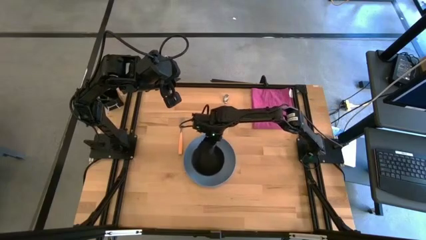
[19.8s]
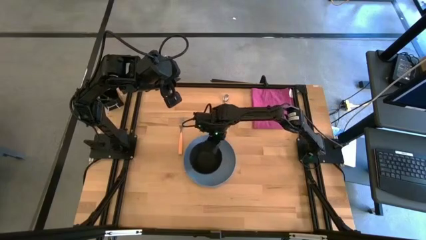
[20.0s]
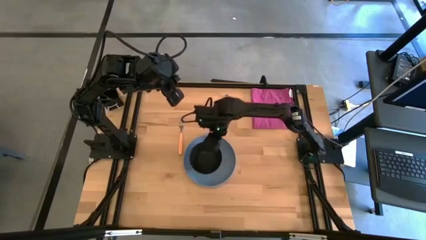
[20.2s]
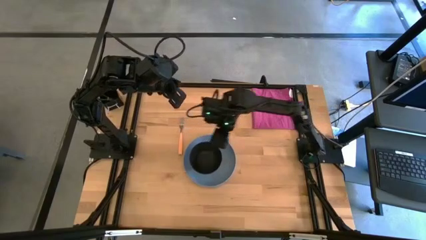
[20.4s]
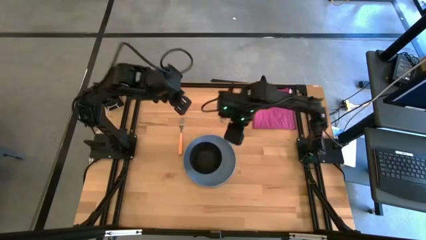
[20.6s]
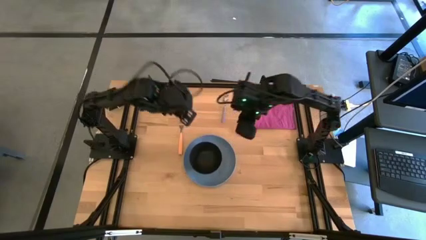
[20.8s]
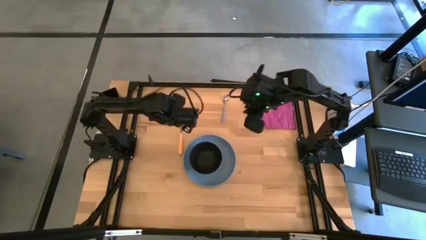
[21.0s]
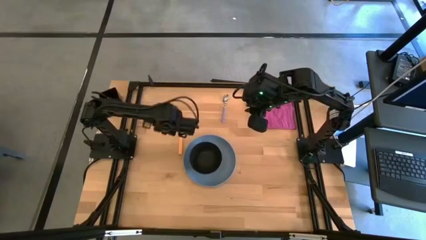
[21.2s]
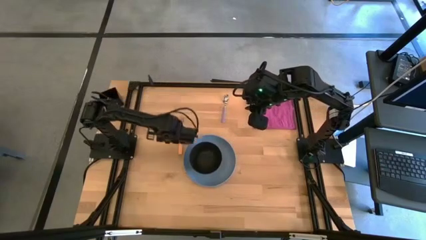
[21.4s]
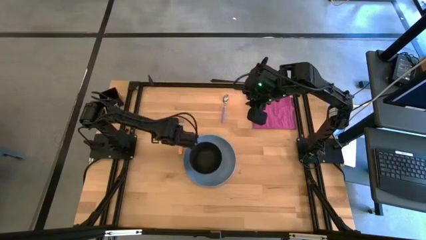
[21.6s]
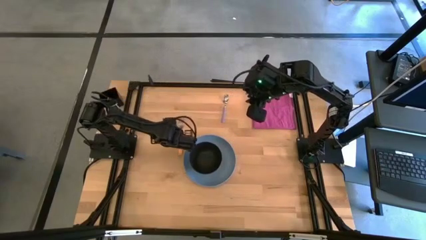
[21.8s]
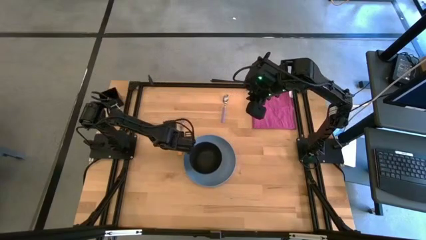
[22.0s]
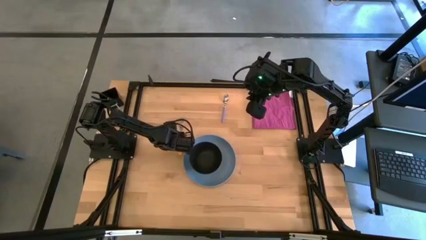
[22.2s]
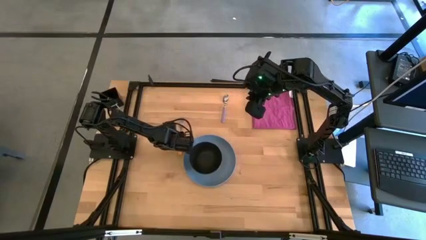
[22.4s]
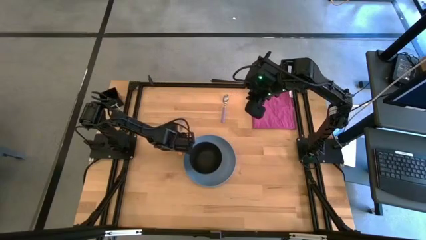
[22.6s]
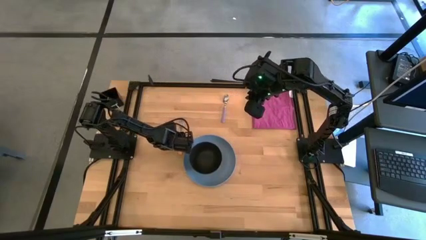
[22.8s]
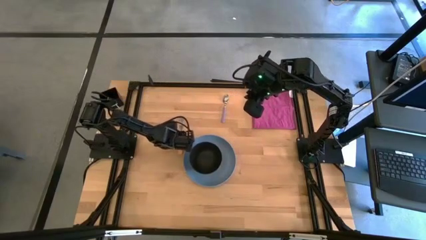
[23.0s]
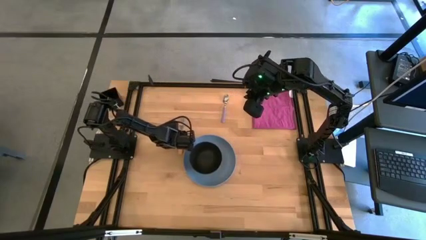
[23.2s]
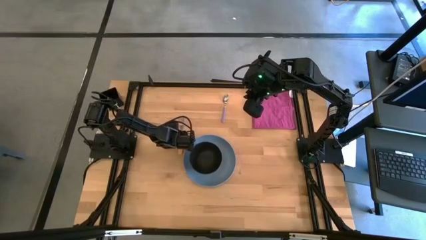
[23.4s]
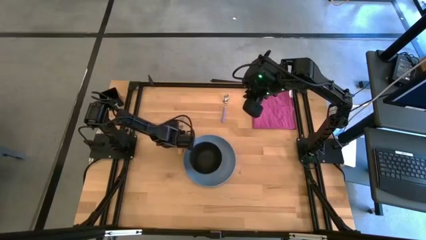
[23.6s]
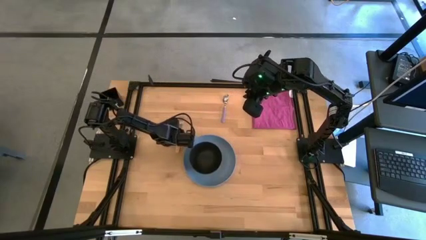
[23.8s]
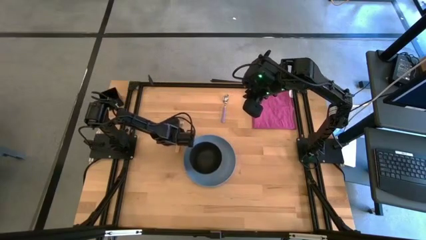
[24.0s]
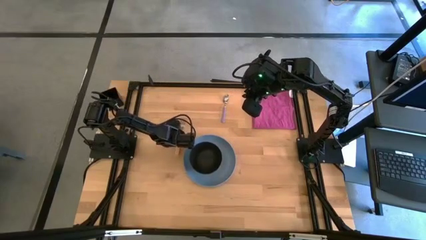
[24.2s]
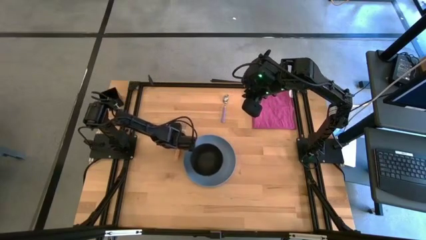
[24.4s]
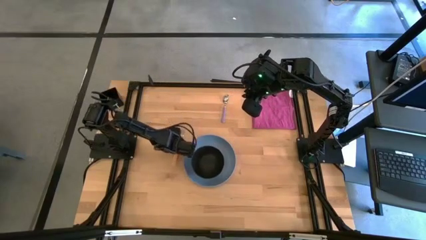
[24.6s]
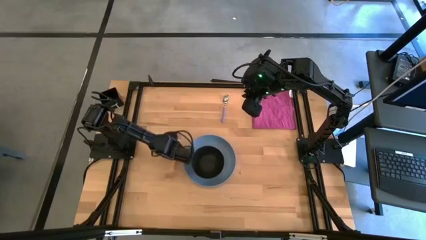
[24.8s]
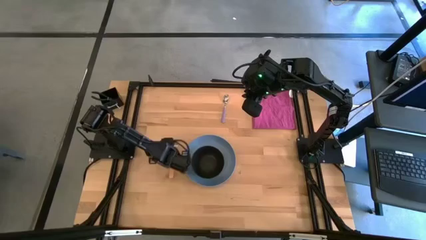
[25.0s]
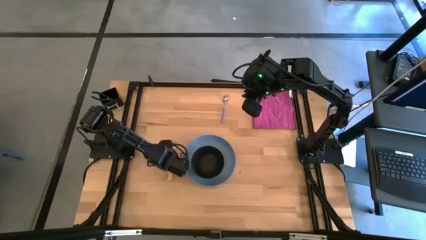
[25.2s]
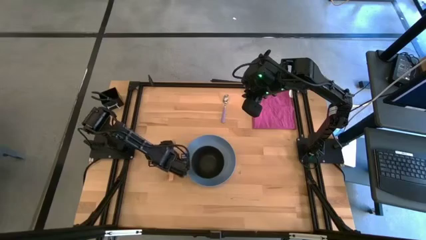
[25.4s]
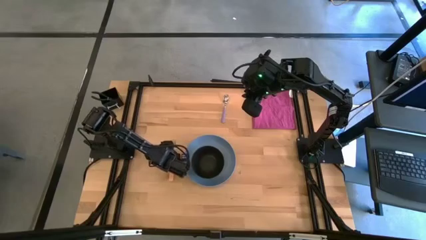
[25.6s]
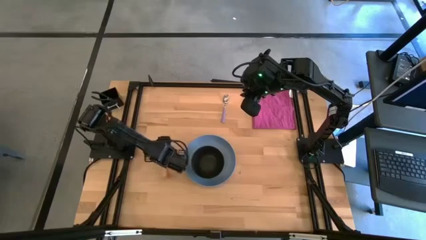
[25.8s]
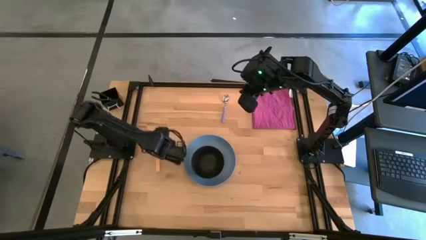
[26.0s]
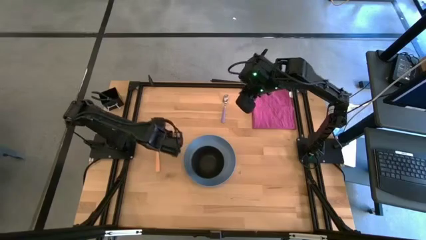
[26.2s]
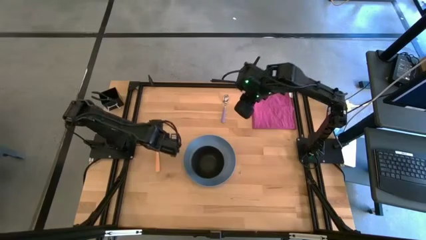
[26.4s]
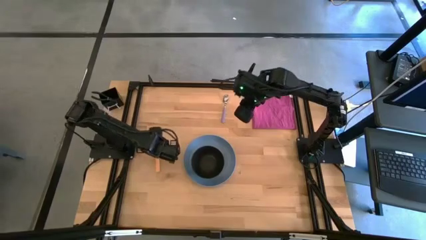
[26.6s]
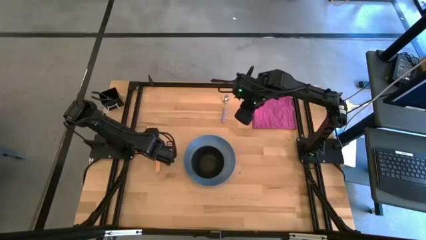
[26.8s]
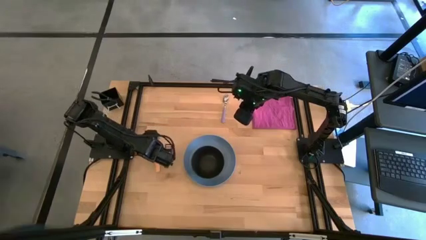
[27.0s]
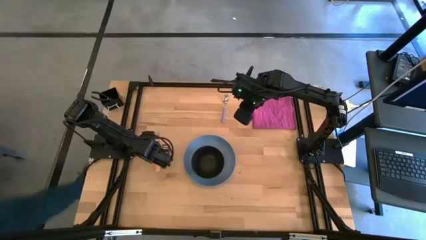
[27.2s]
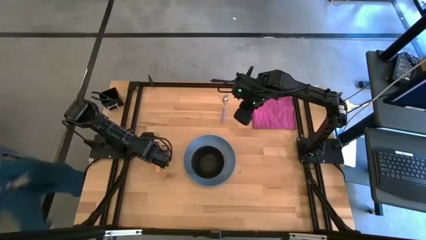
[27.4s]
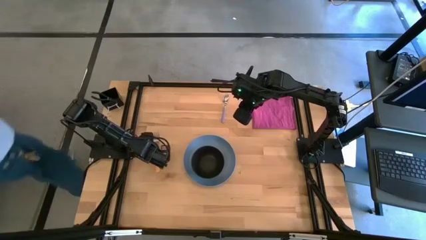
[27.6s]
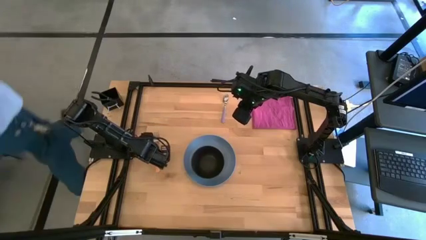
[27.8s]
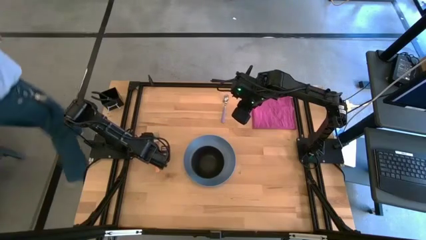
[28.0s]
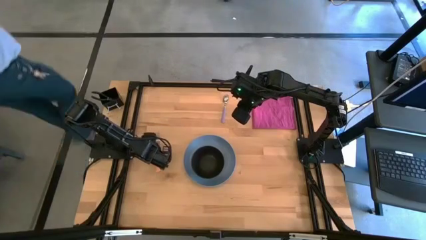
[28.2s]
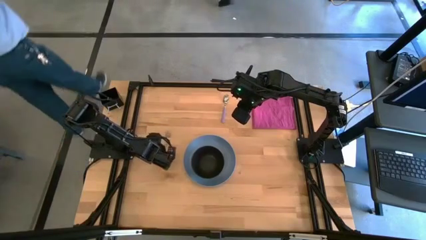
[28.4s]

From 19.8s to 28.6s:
Task: Set table place
Move the orange fork to the left side of the blue plate

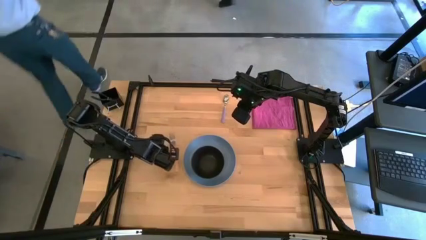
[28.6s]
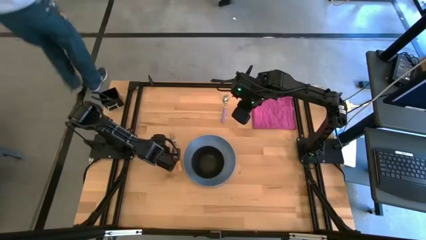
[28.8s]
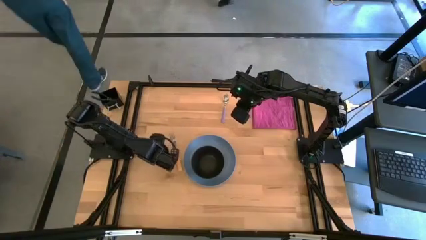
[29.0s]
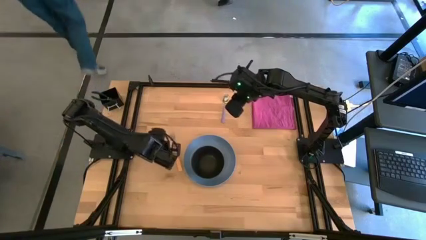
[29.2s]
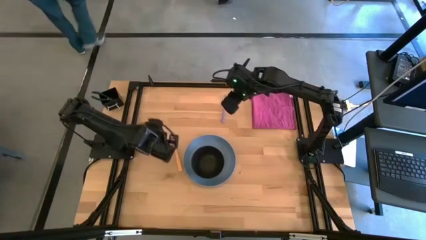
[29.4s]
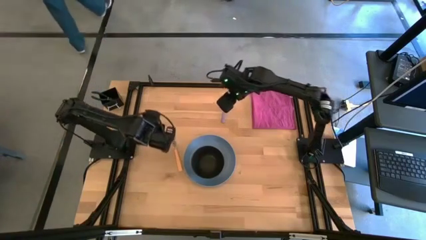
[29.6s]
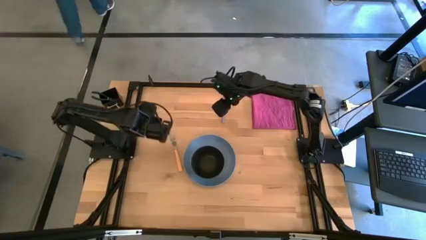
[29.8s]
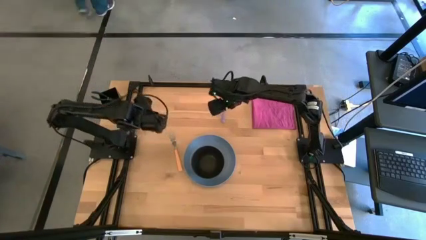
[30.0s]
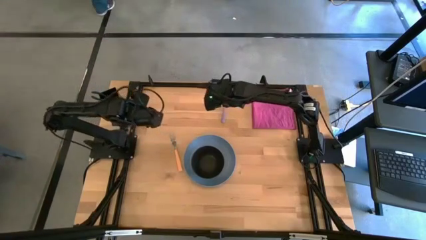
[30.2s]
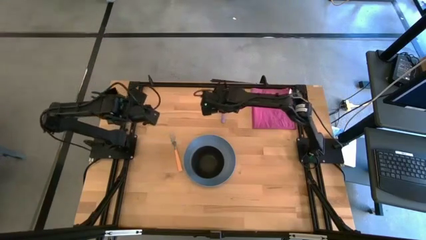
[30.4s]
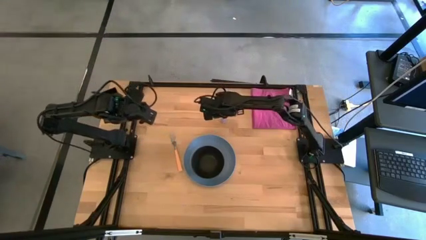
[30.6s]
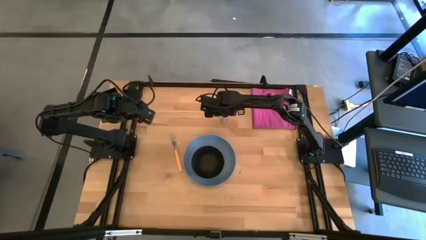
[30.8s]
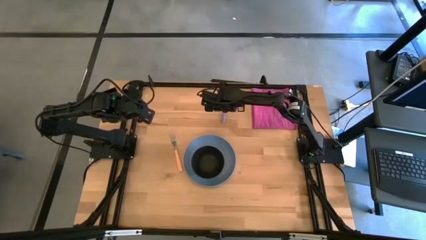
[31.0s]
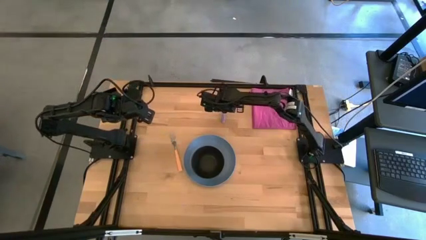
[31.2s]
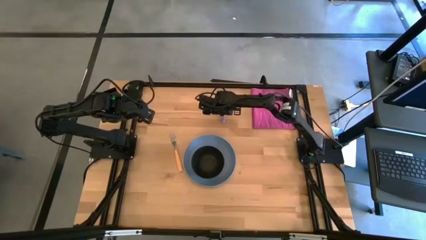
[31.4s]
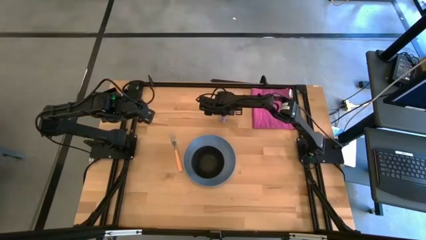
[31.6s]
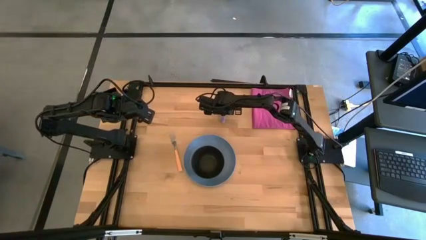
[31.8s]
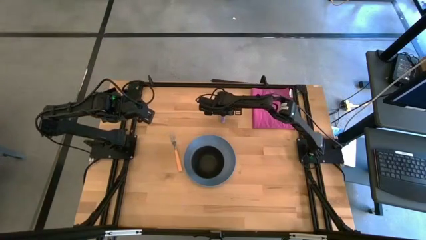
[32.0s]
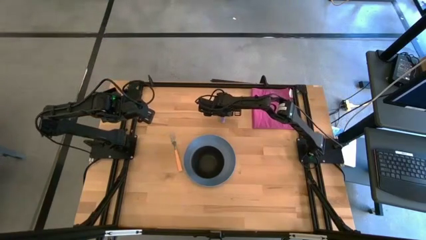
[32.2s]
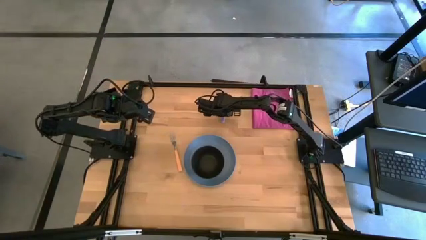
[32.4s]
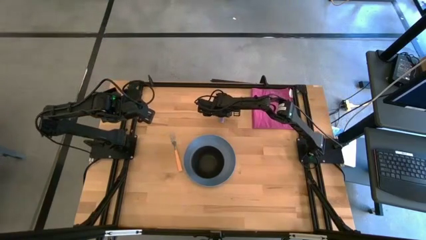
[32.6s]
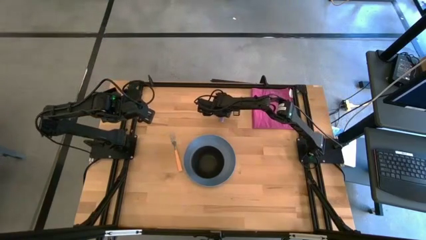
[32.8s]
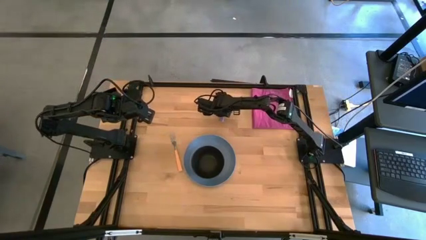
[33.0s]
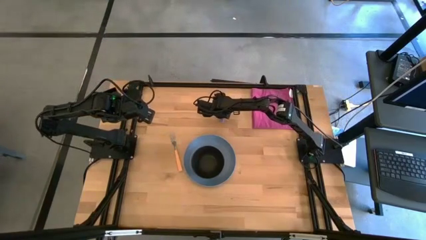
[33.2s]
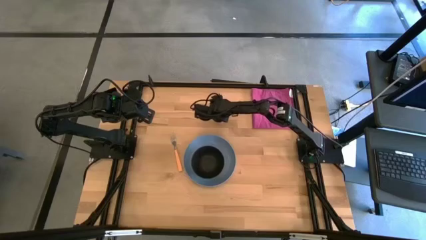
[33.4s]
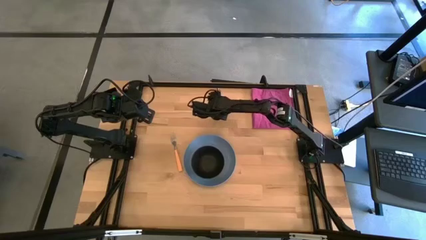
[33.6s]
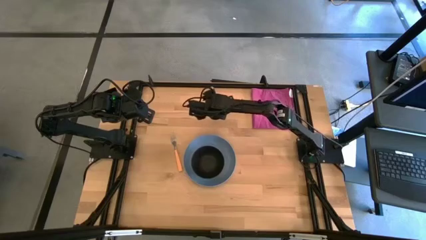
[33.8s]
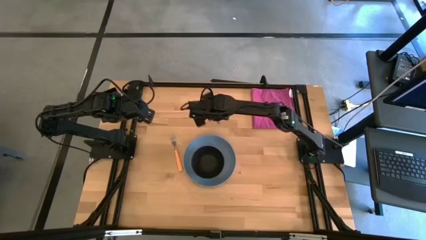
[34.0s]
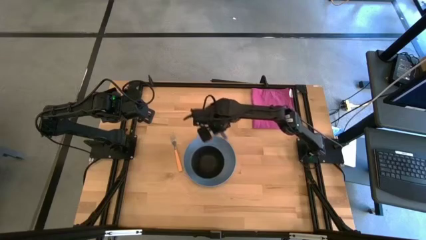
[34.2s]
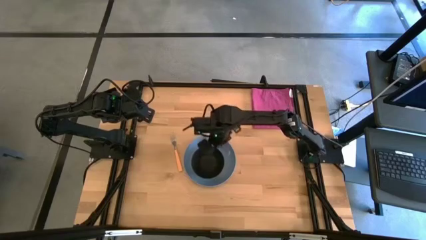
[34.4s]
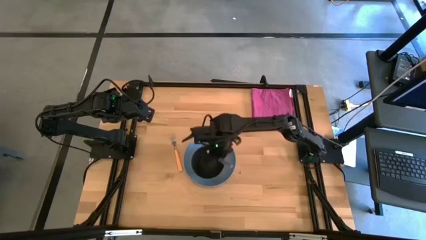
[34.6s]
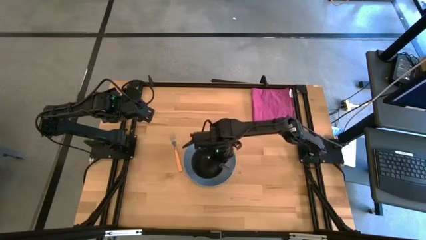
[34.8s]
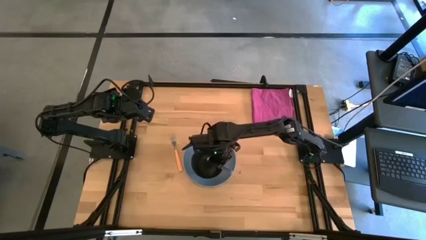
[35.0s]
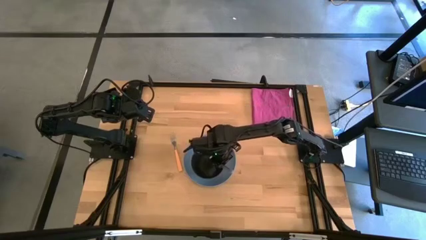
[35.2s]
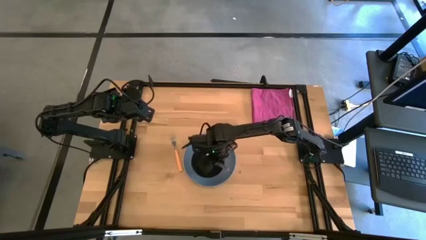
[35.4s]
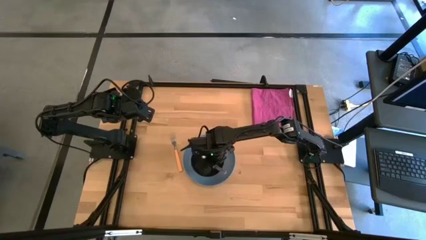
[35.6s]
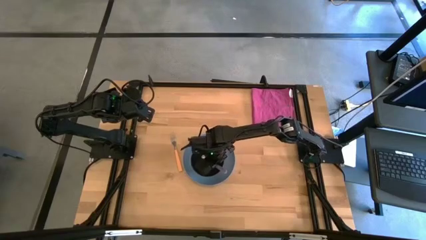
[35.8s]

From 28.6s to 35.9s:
Put the blue spoon on top of the black bowl

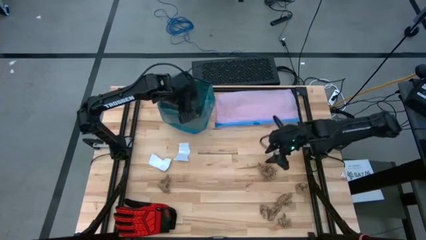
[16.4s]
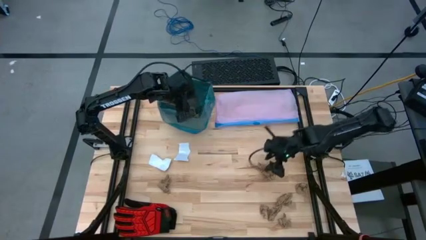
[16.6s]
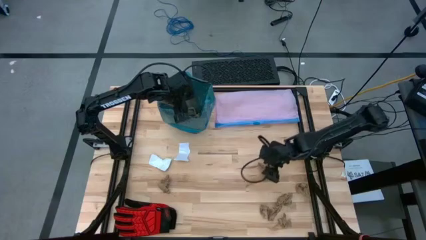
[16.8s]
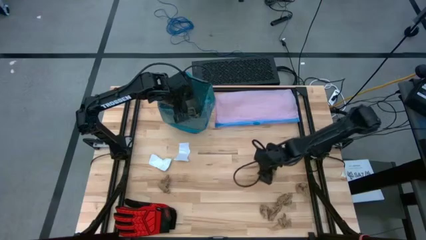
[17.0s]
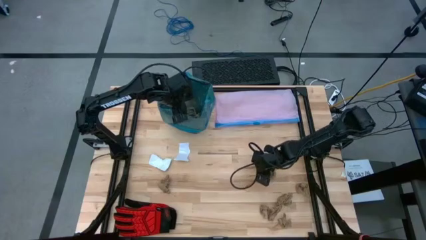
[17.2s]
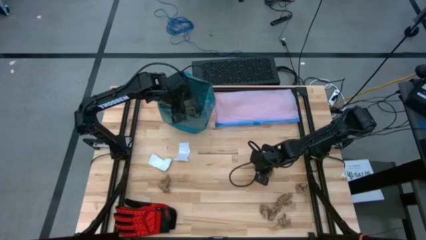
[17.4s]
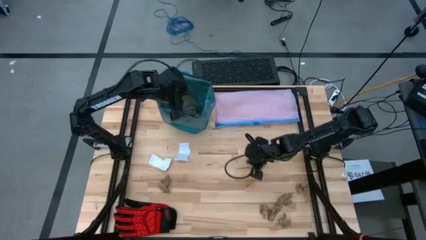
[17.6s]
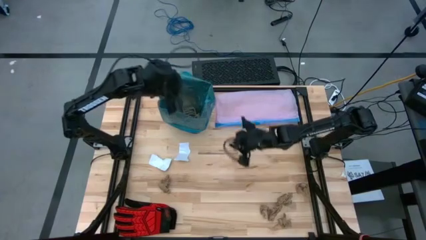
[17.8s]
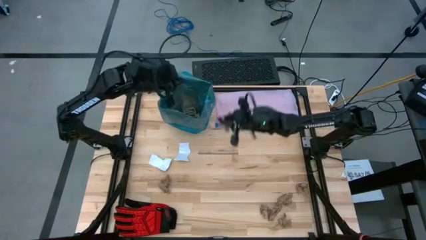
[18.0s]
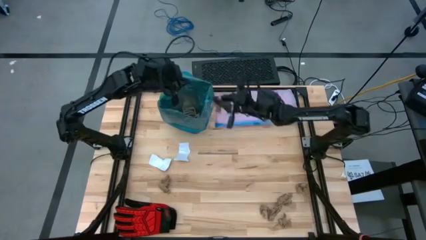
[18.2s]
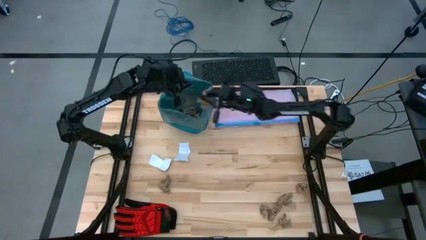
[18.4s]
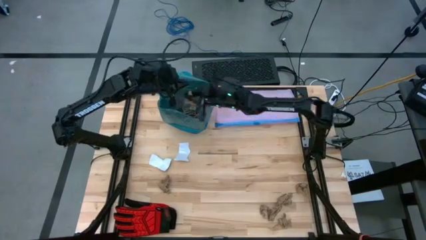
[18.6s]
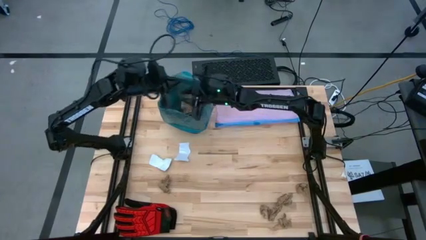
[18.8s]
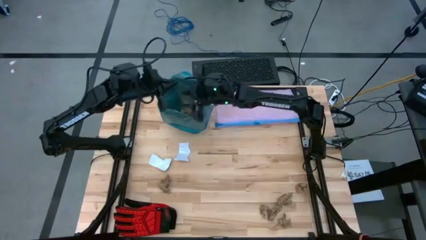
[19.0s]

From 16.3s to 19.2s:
Task: place trash/remove bag and relplace
Put the brown napkin into the trash bin
